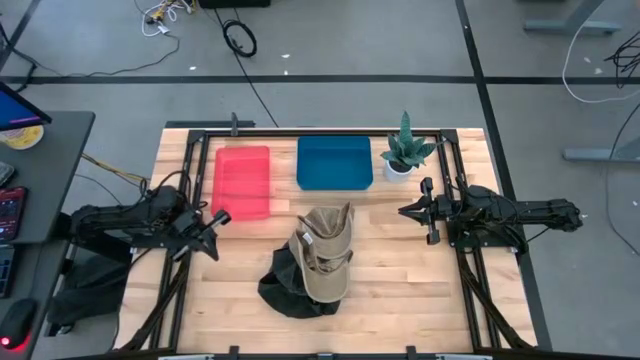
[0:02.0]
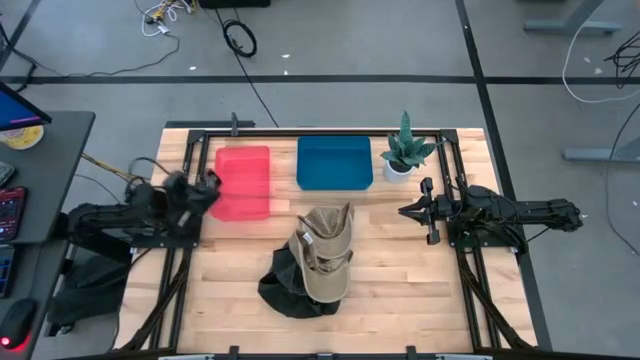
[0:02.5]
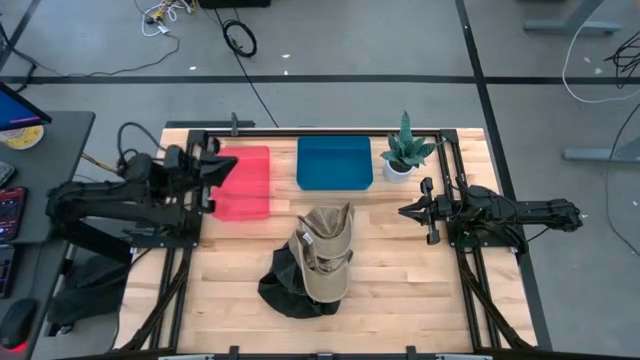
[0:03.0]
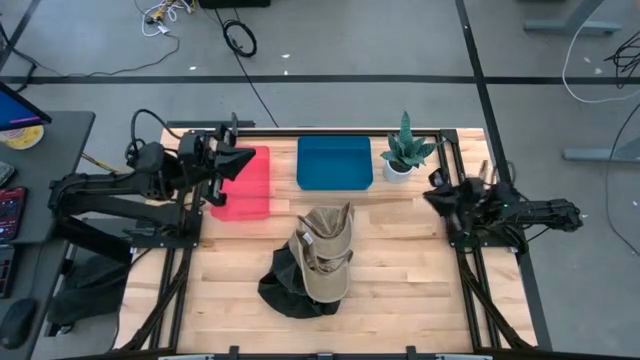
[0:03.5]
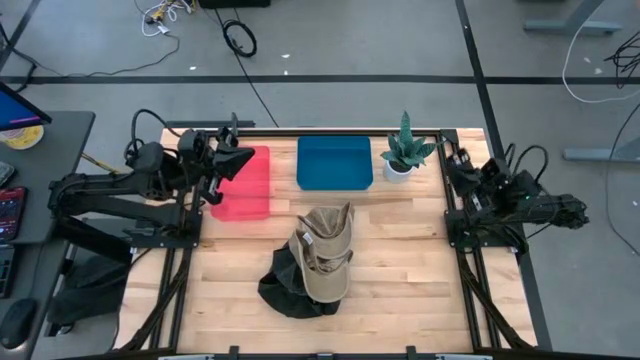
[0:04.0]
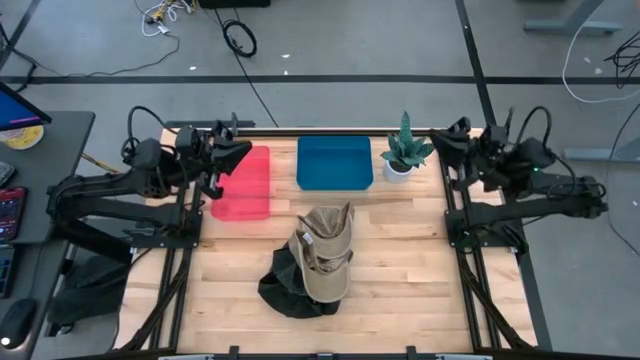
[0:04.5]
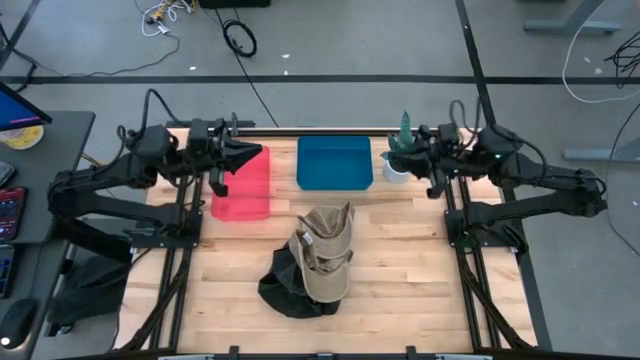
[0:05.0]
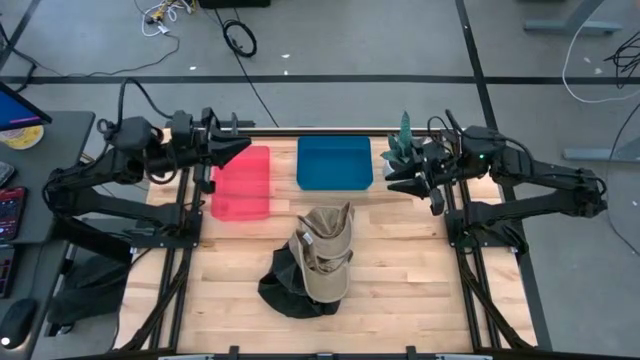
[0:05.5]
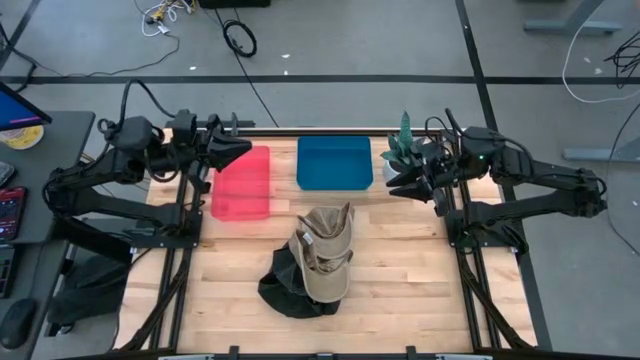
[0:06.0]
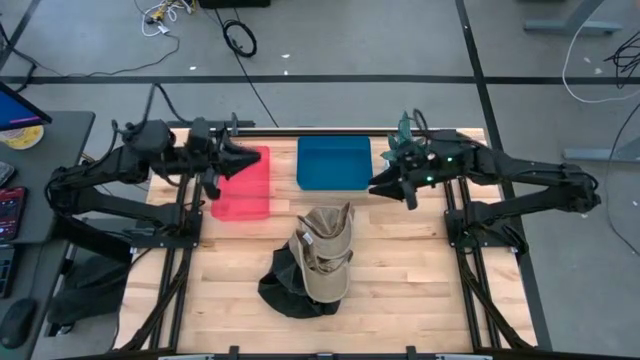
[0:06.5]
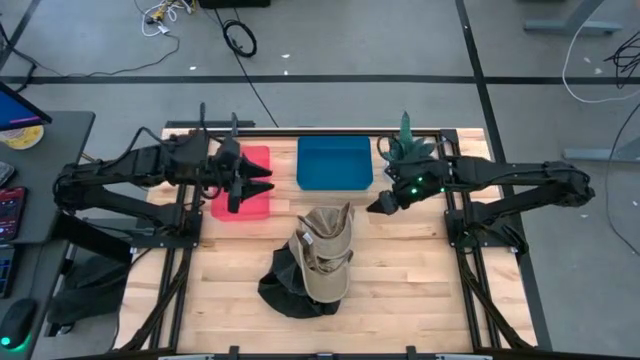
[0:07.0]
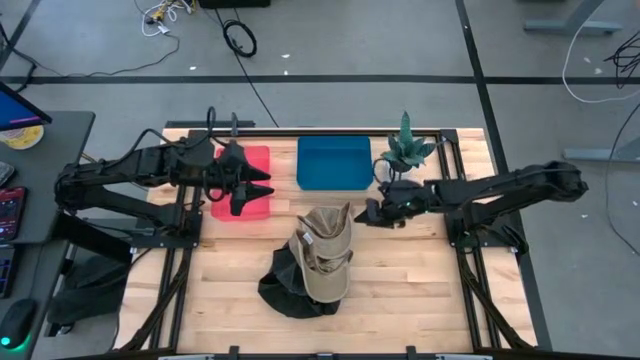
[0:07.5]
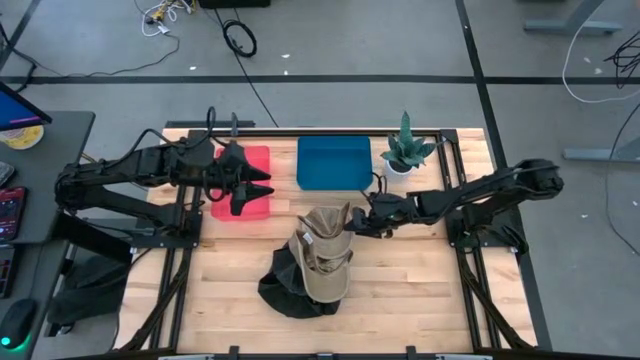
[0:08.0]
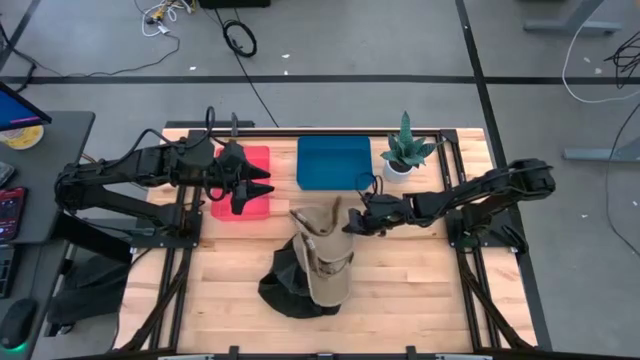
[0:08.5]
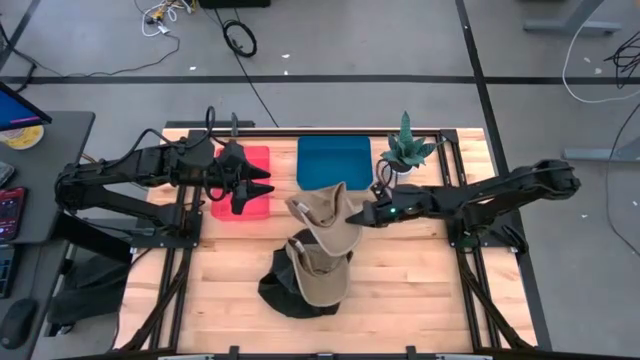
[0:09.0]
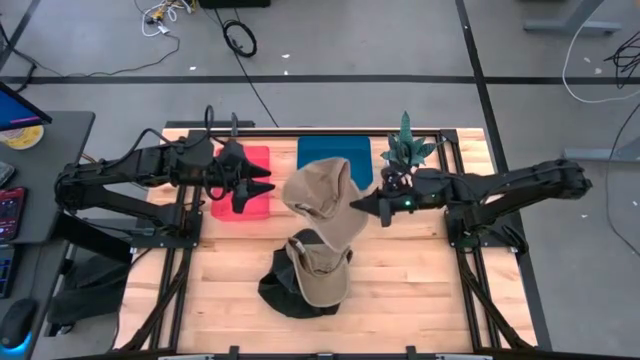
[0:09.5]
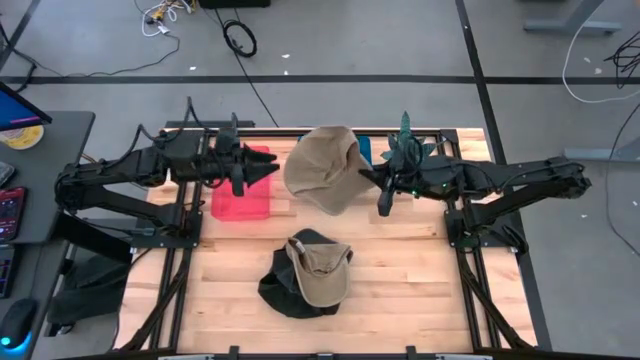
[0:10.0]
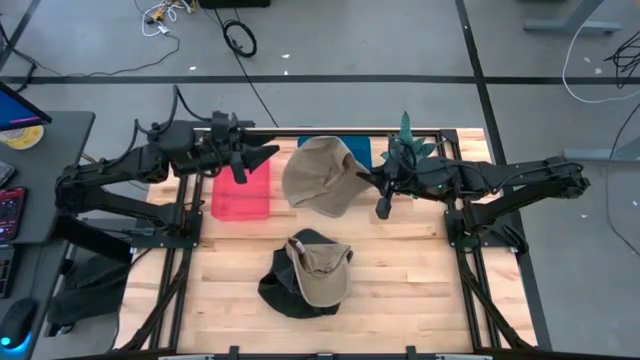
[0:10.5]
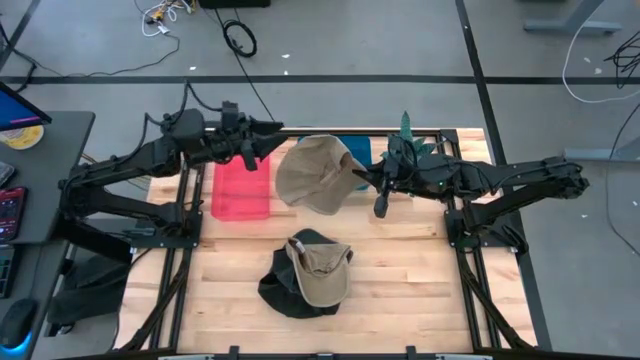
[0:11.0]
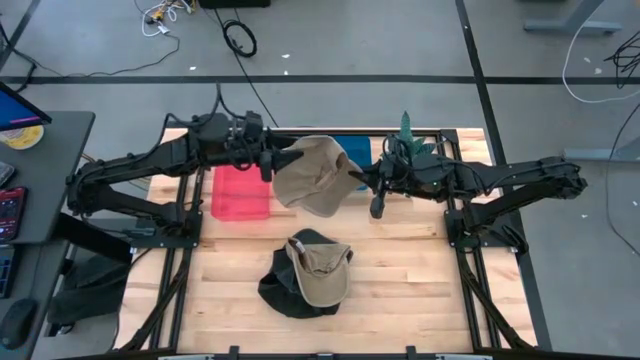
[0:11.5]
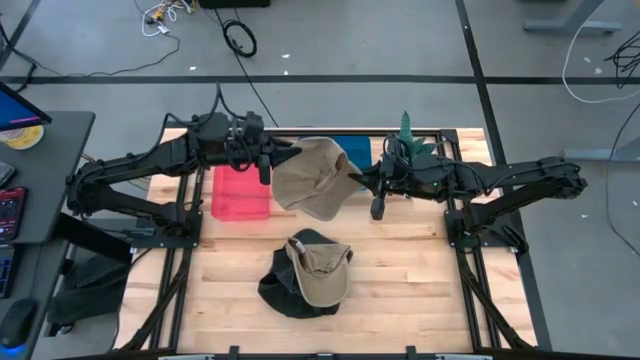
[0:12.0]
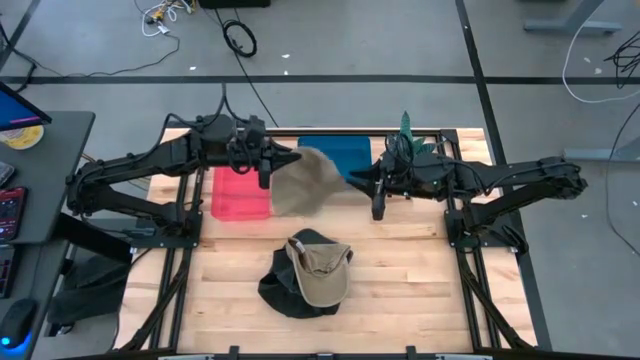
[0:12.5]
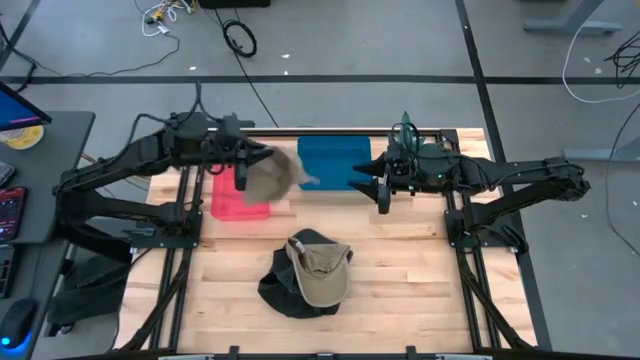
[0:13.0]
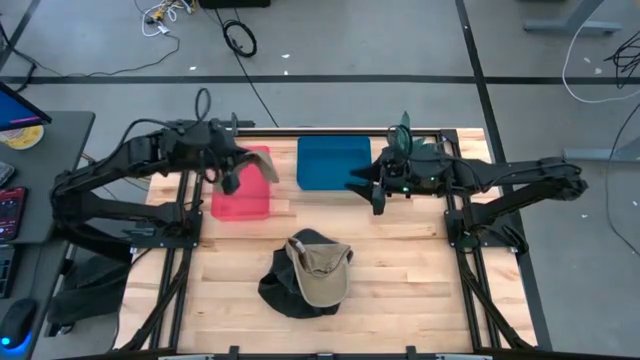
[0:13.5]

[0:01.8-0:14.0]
Task: Pick & Place hat
Put the top brown cap into the blue bin

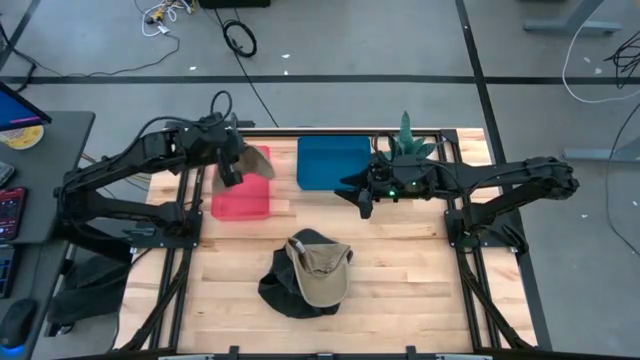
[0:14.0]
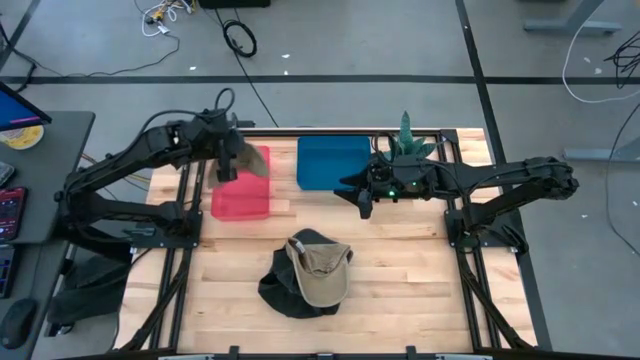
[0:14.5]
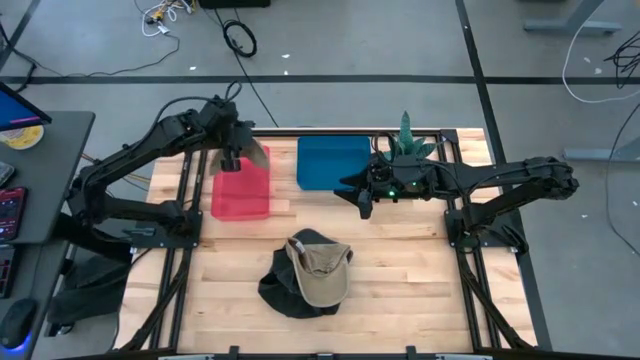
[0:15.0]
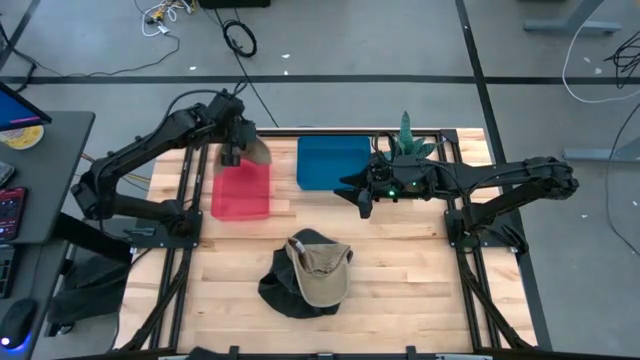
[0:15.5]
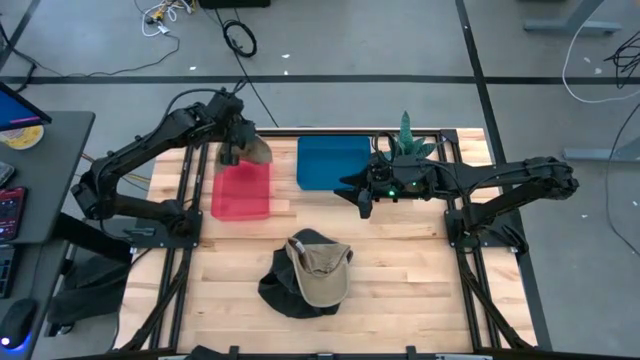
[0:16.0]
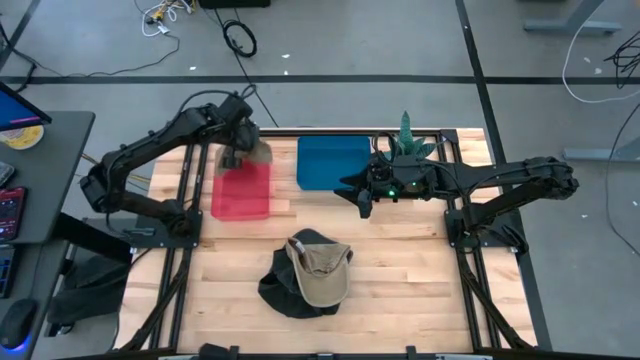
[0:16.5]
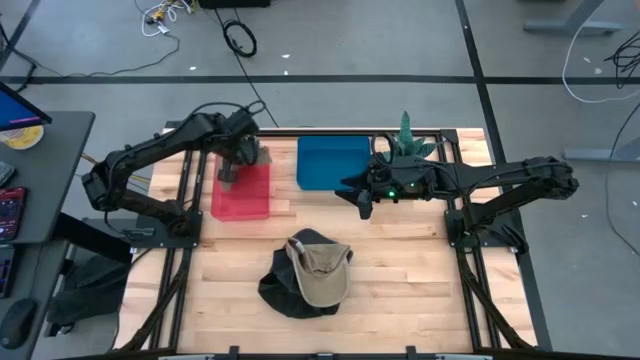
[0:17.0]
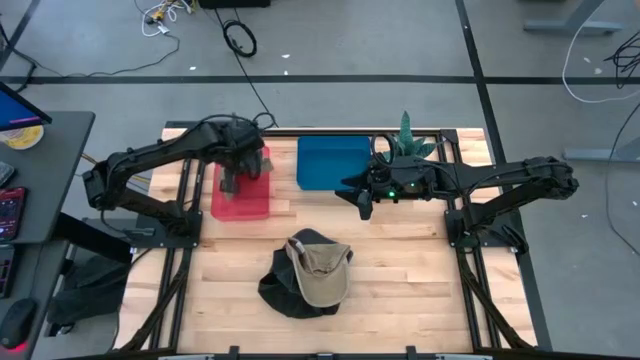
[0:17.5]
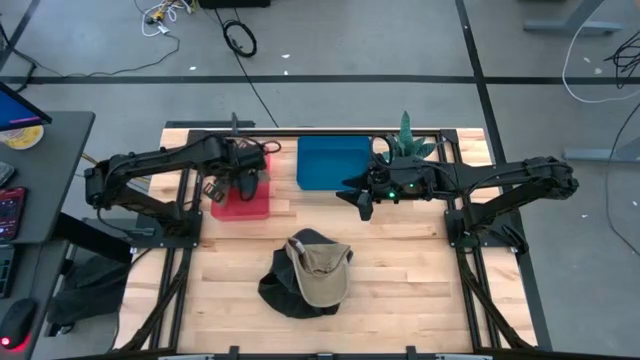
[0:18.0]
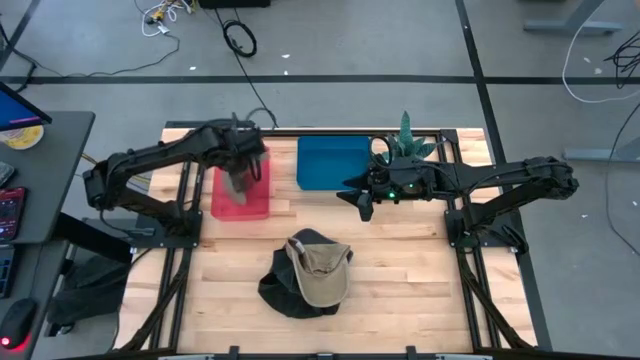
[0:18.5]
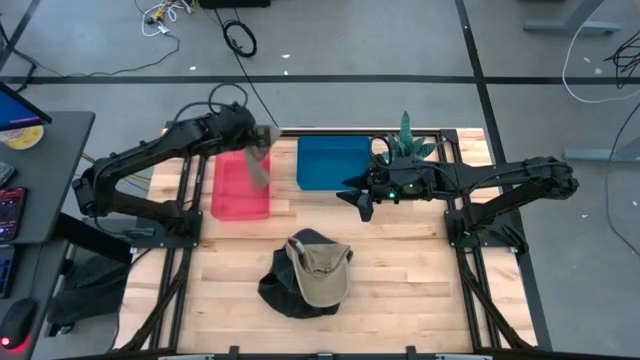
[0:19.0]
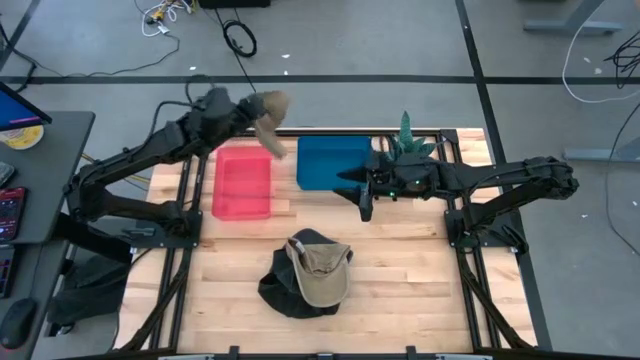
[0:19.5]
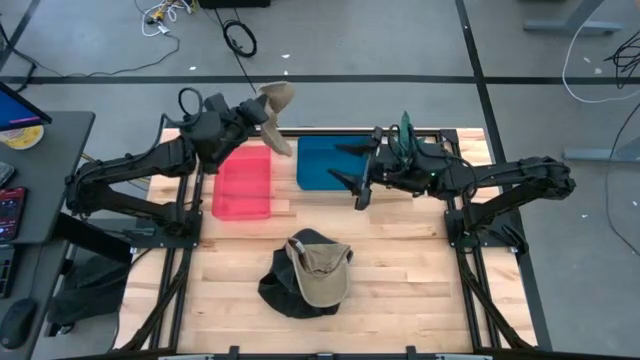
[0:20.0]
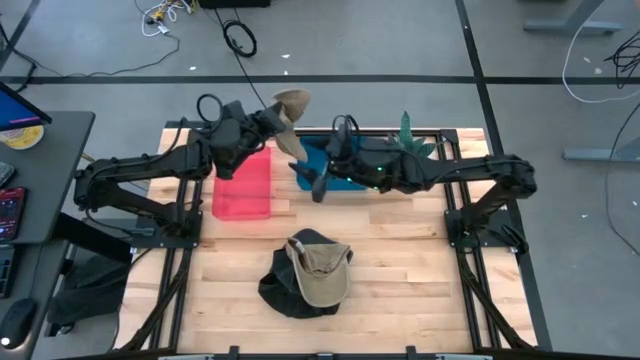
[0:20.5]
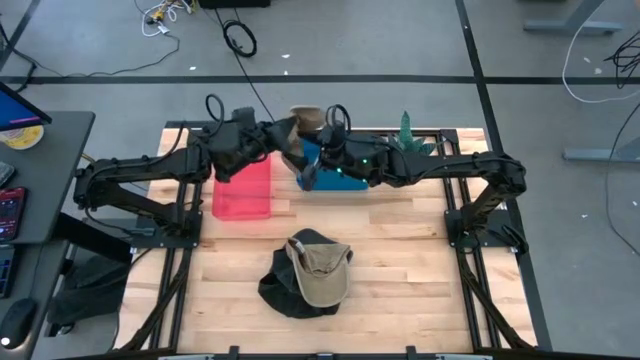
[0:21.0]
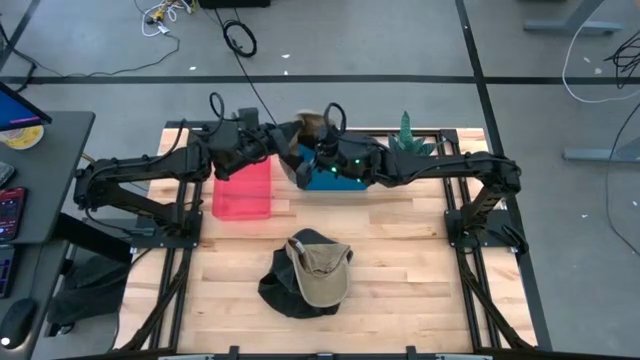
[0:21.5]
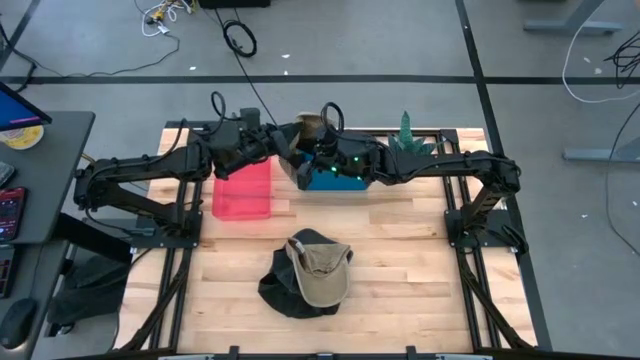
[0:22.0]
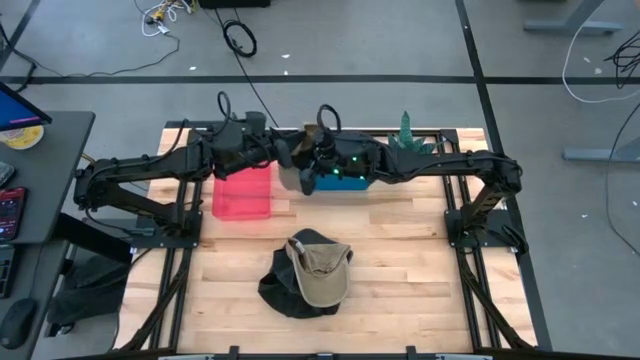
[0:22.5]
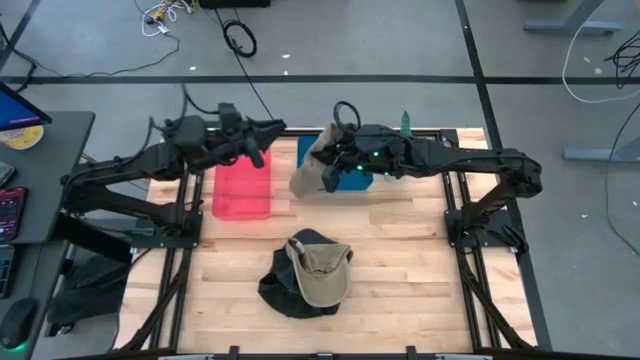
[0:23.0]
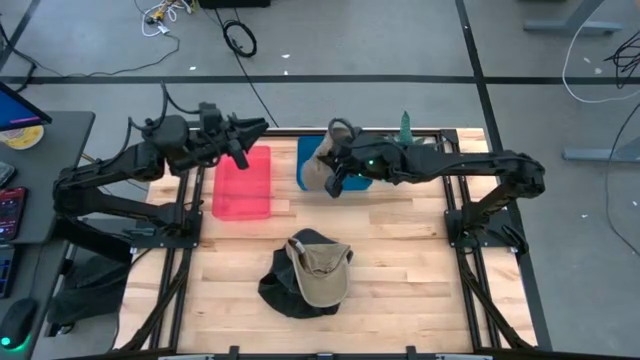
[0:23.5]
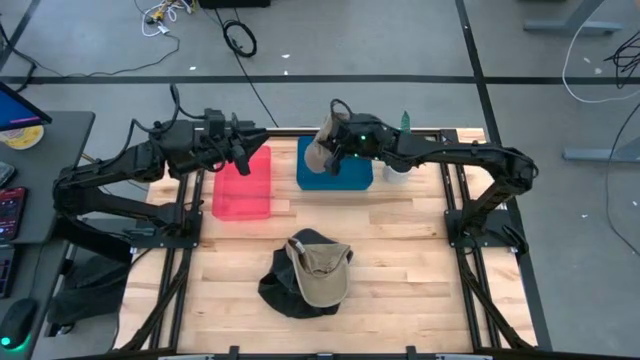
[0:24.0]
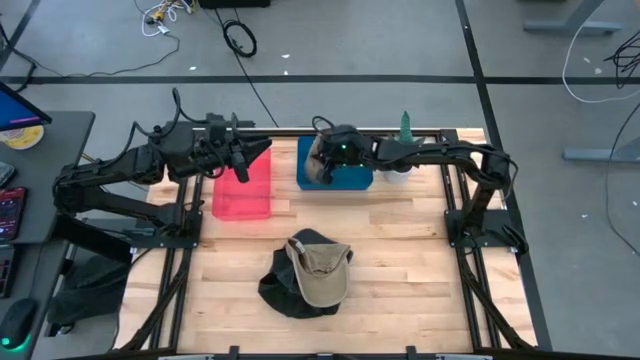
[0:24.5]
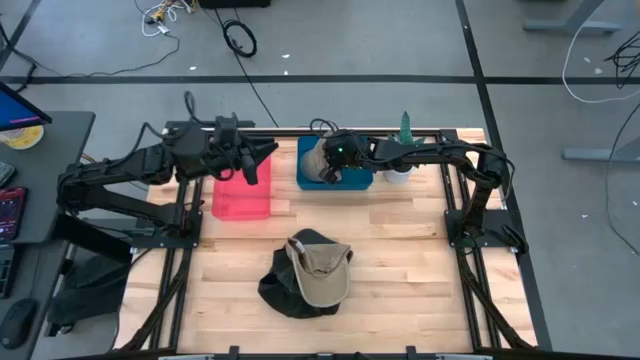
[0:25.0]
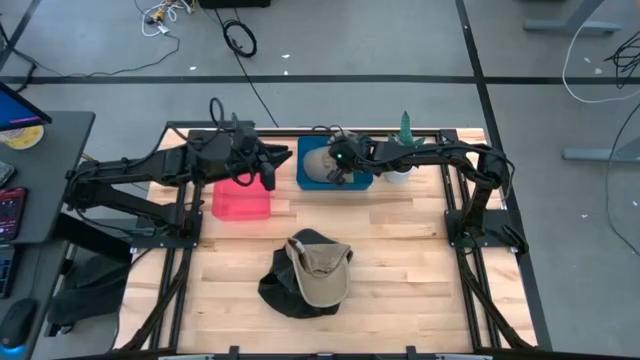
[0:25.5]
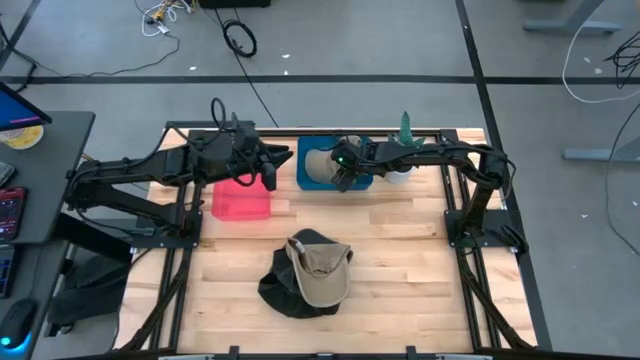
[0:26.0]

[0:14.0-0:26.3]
Put the top brown cap into the blue bin
